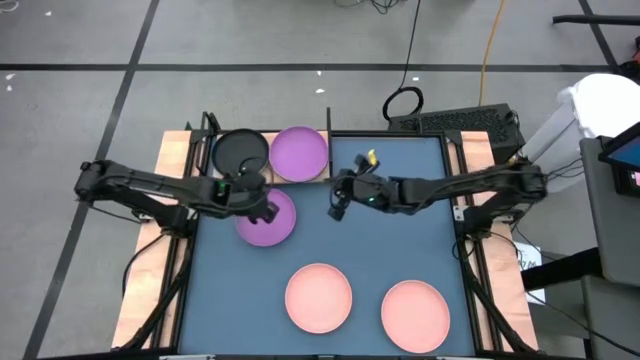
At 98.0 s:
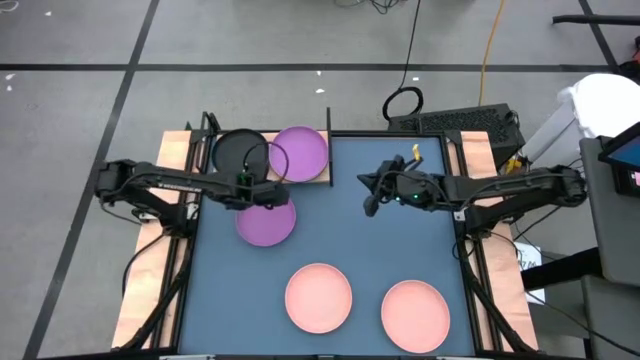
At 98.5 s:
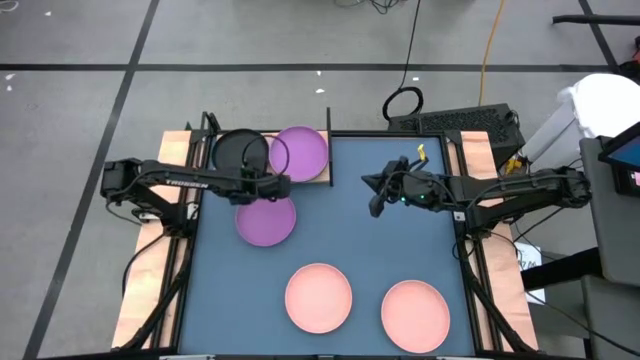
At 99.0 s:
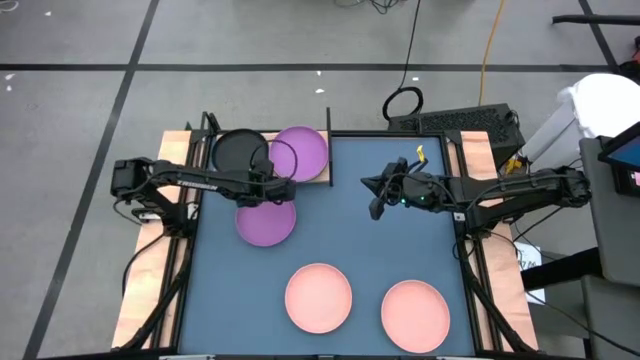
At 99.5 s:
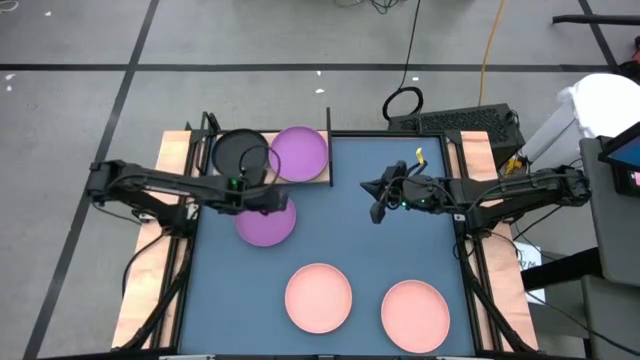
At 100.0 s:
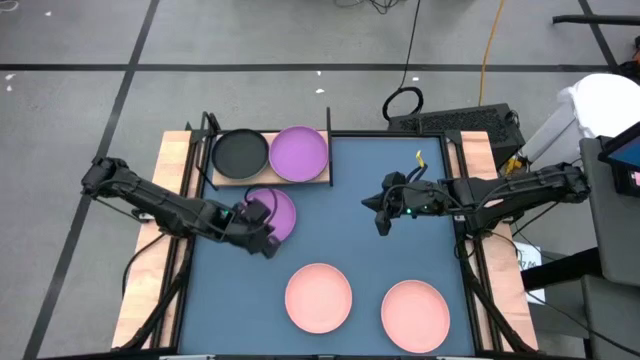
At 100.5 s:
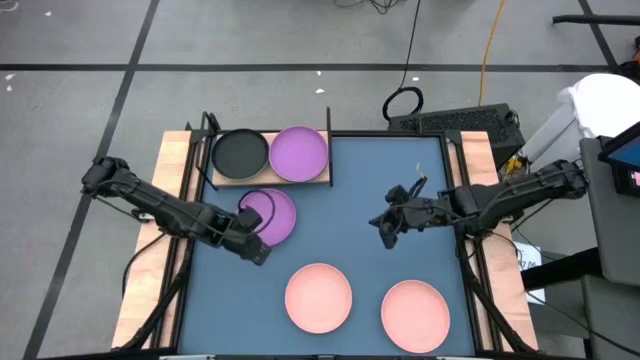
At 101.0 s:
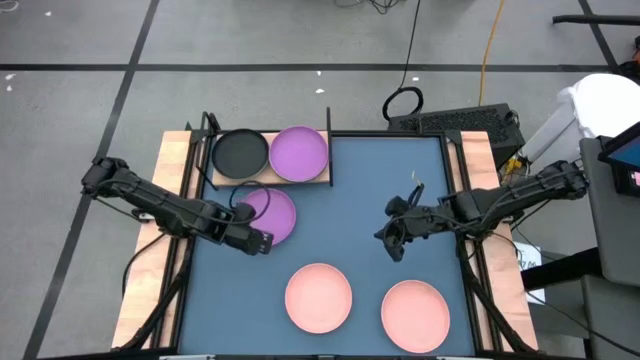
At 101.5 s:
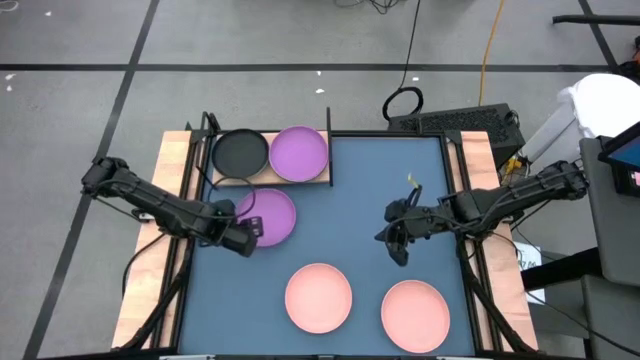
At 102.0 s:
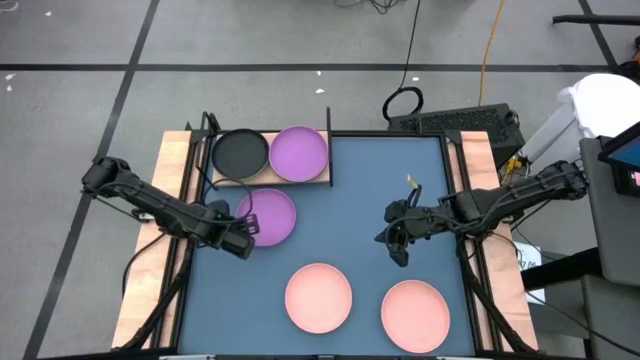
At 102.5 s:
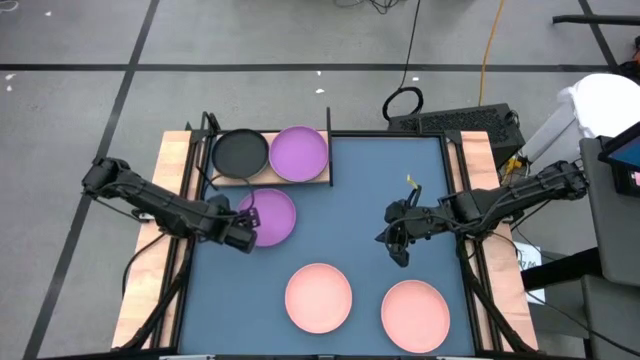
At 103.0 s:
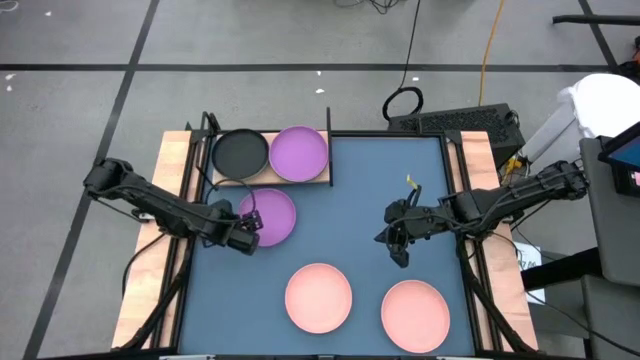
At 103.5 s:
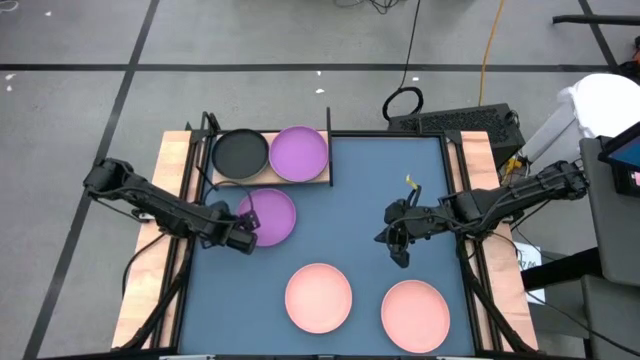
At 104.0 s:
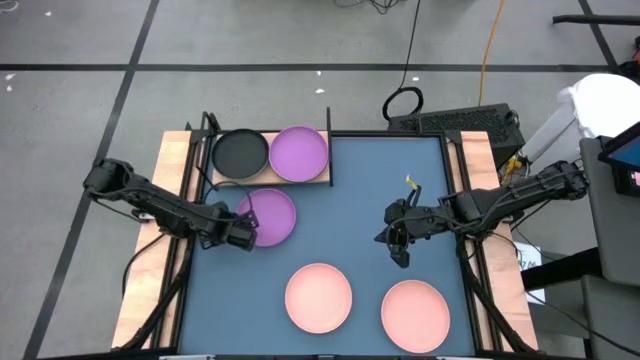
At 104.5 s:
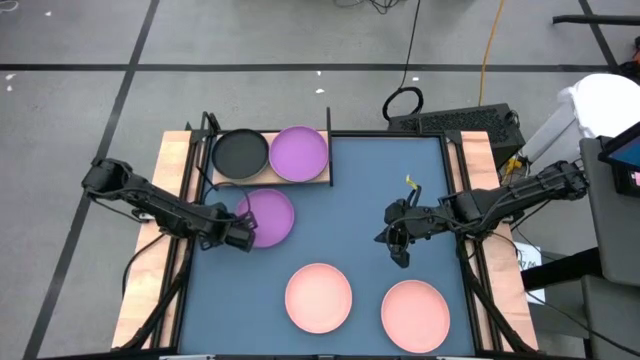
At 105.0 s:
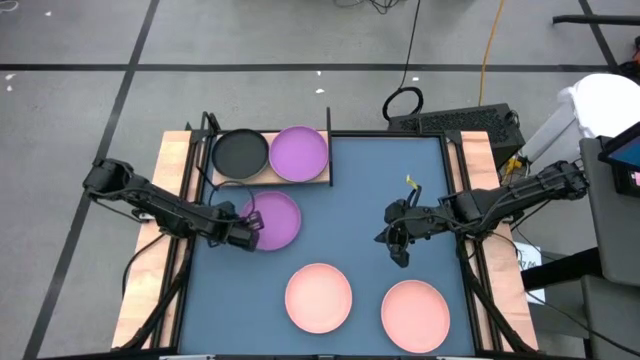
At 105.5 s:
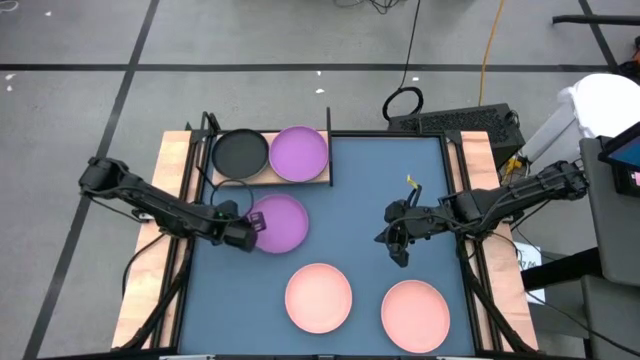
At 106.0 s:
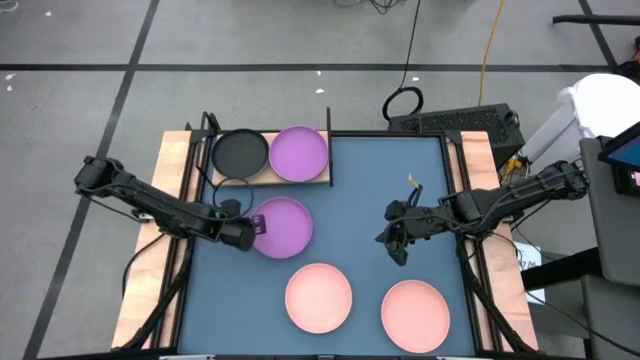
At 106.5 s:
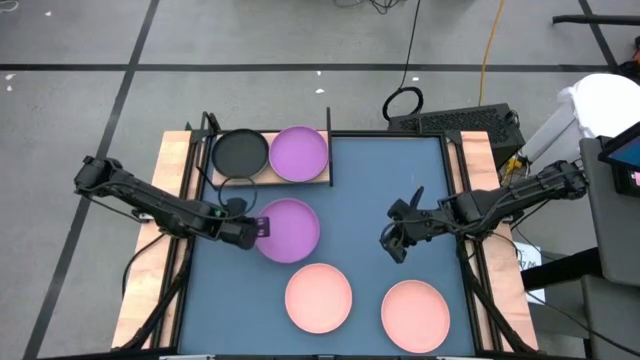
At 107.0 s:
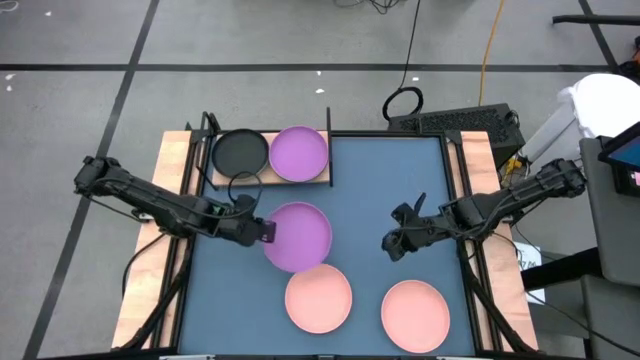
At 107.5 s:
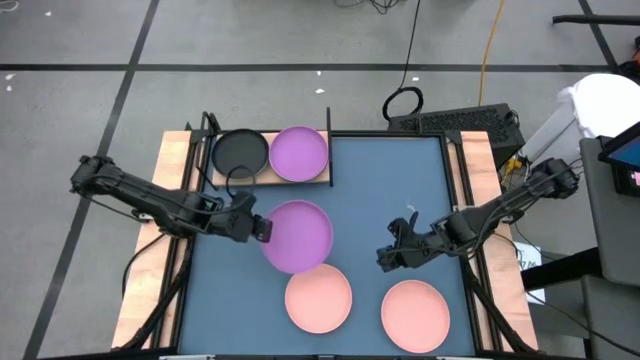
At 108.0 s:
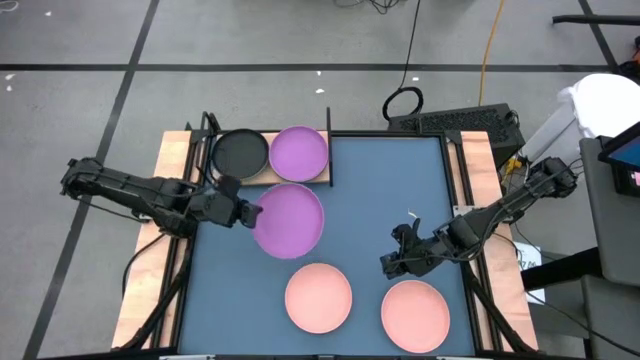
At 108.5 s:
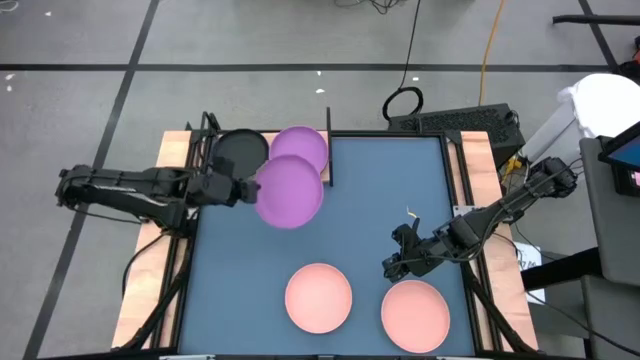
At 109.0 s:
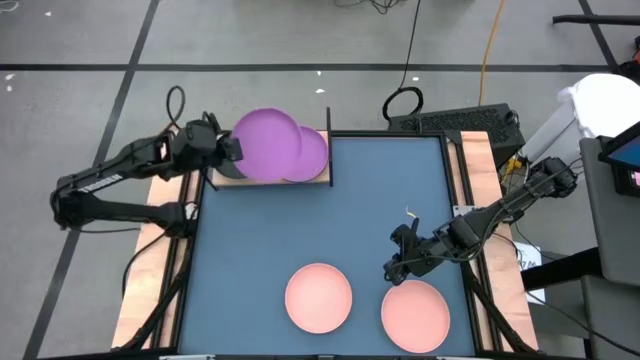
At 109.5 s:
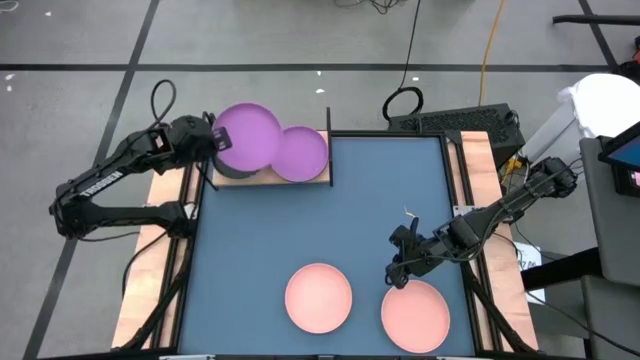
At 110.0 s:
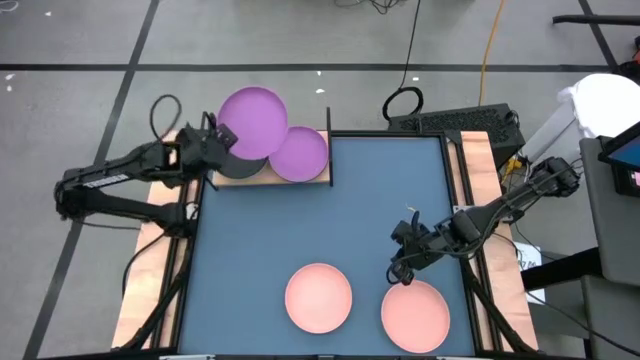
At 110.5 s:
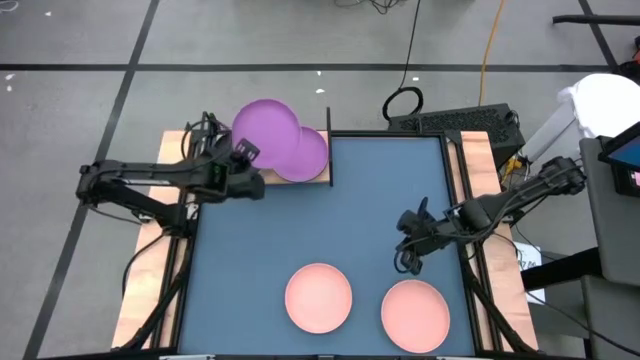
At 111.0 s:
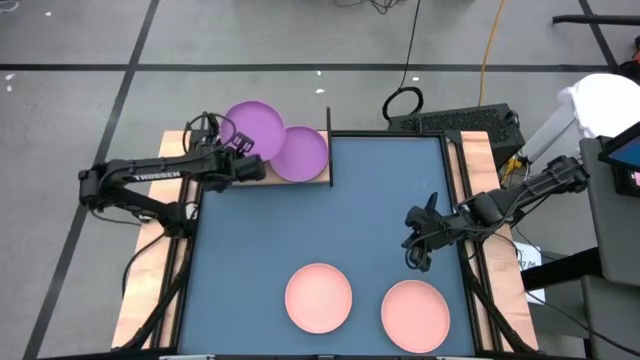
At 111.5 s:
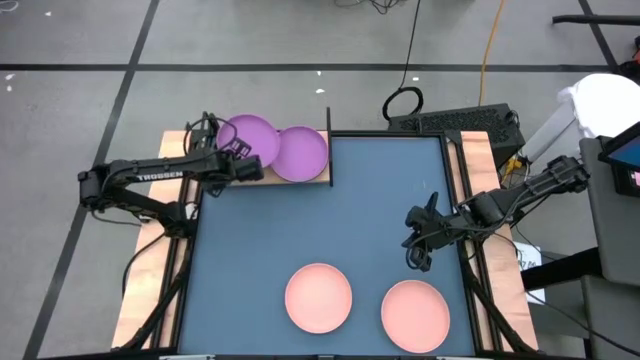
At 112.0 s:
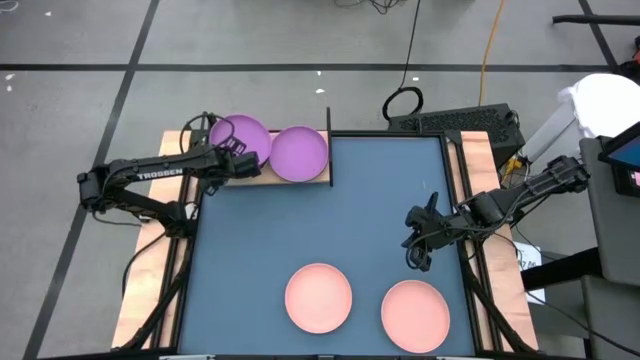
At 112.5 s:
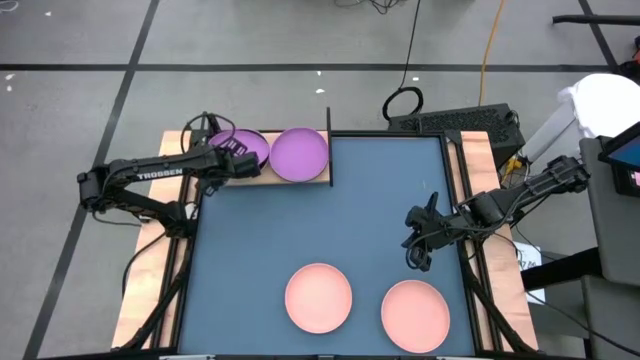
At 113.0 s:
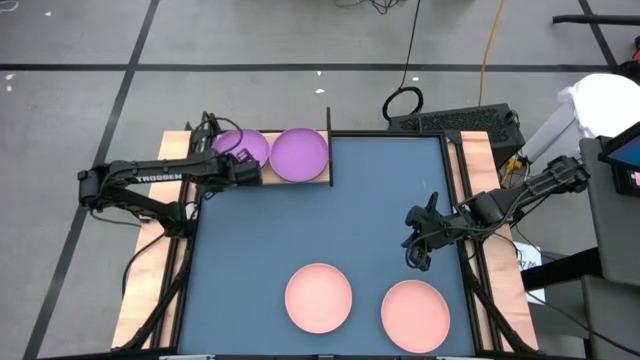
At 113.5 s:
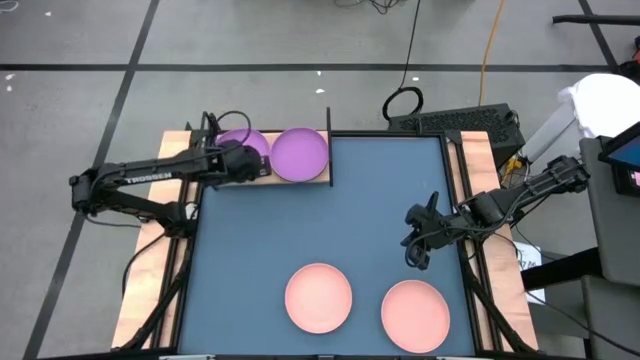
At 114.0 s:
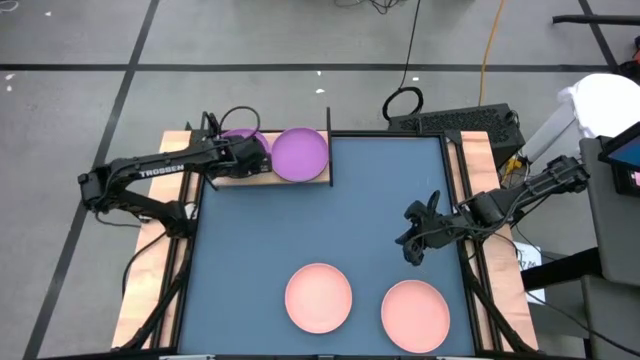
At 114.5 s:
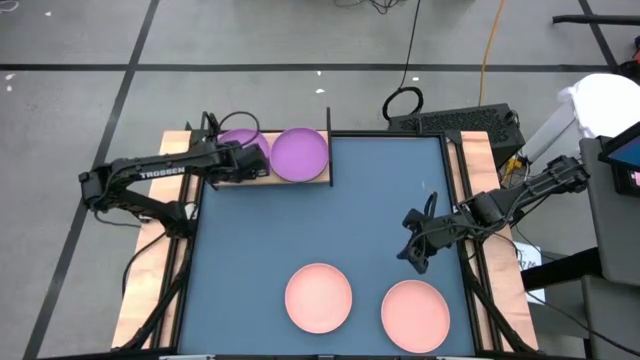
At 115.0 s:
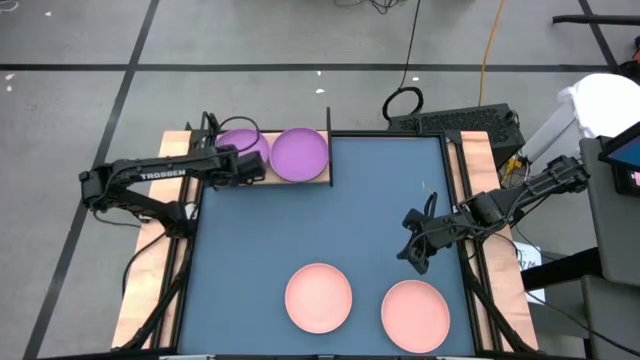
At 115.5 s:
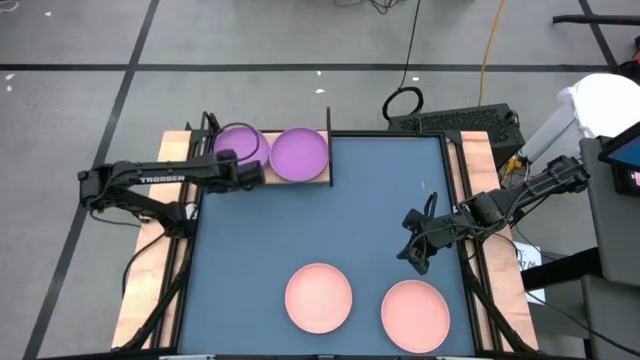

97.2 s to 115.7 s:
Task: Place and stack plates onto a shelf
Stack the violet plate on top of the black plate on the shelf
